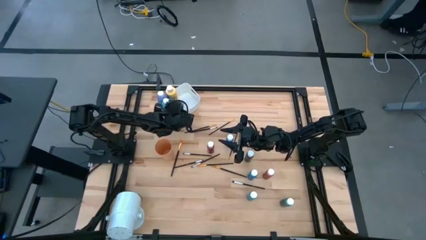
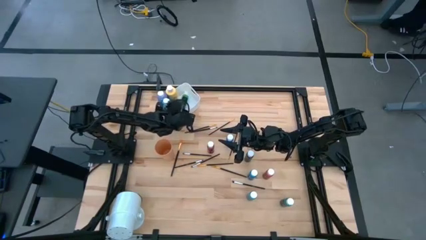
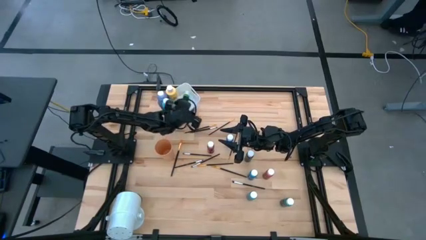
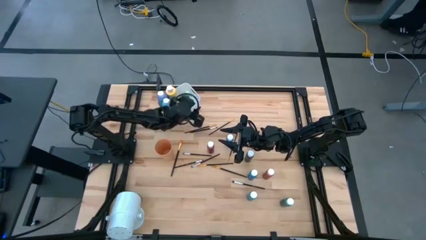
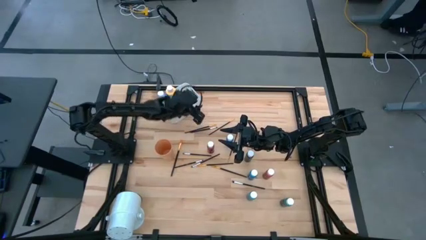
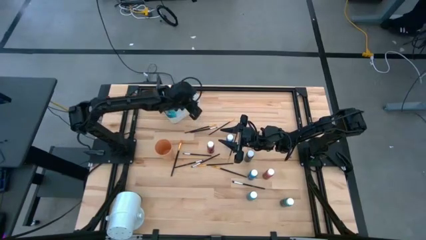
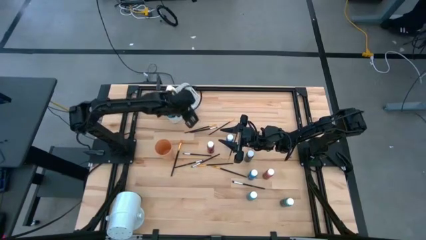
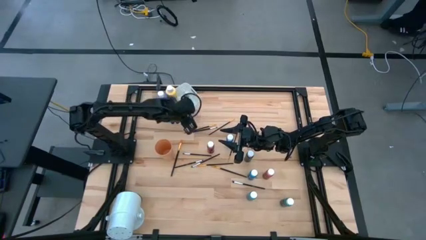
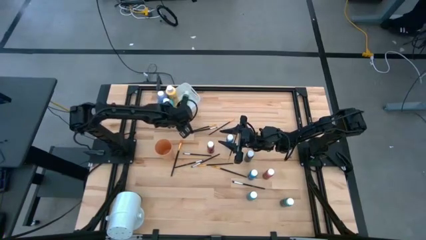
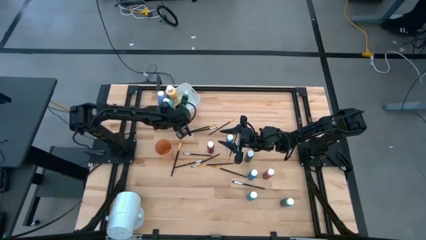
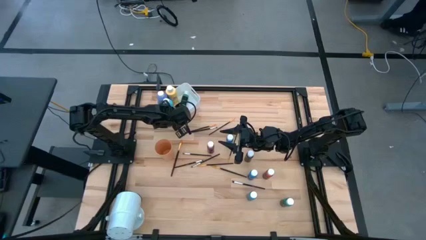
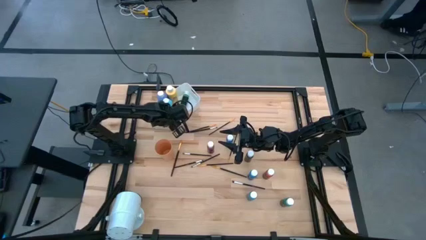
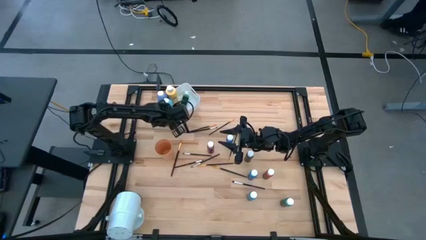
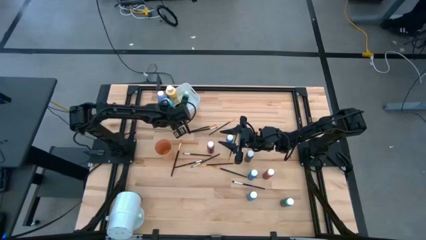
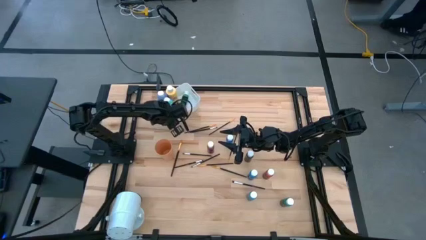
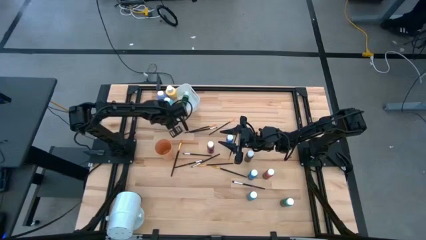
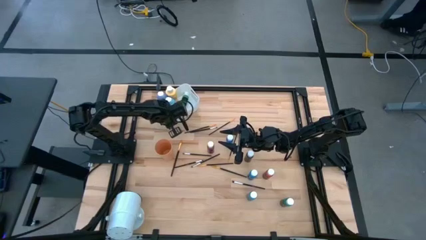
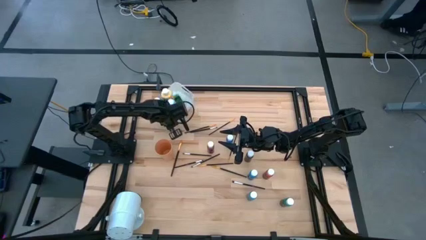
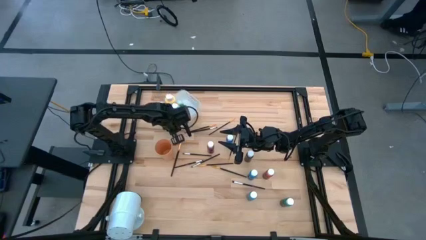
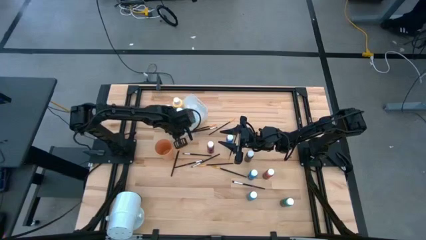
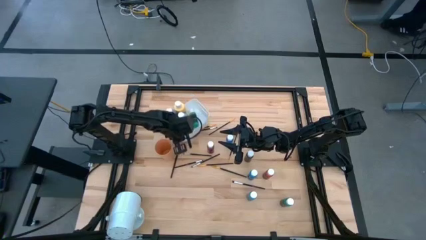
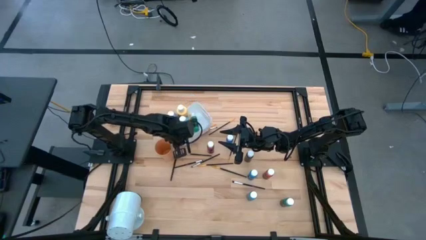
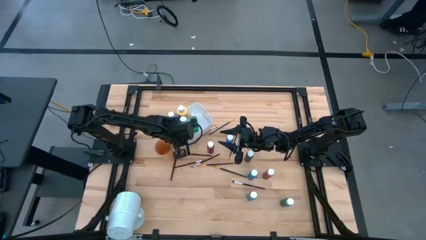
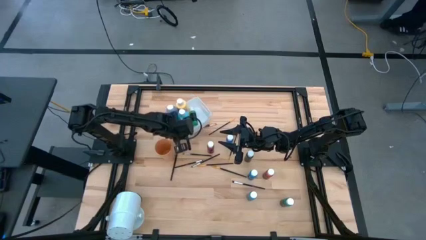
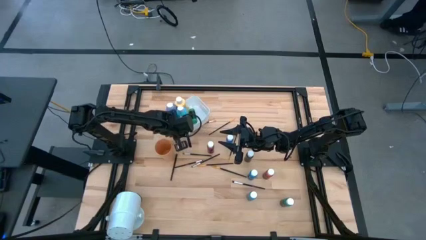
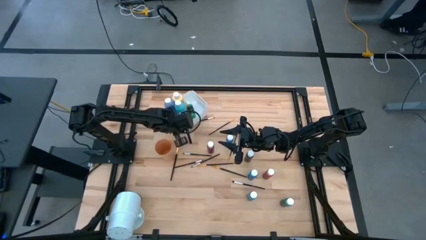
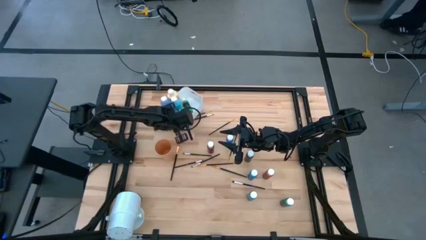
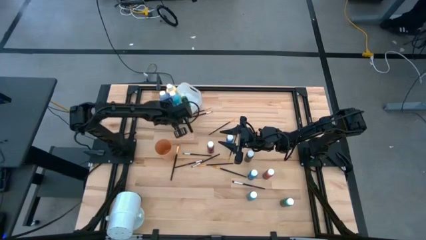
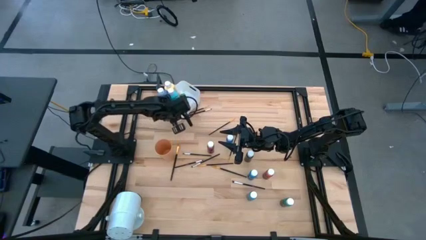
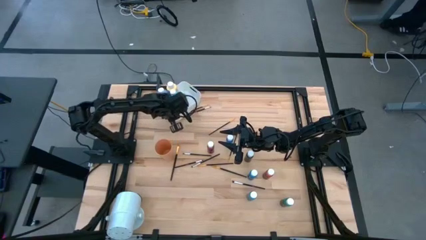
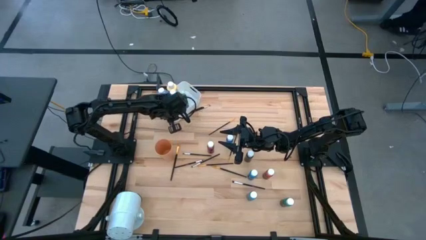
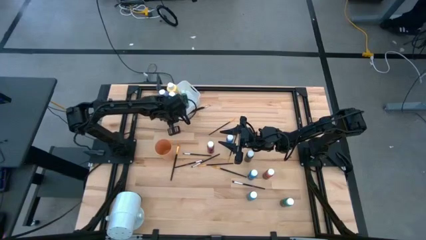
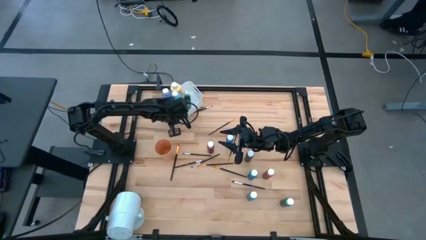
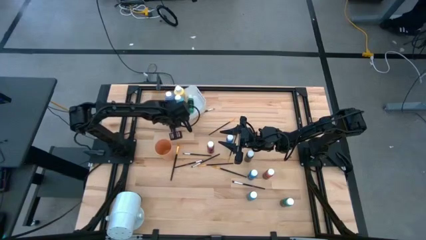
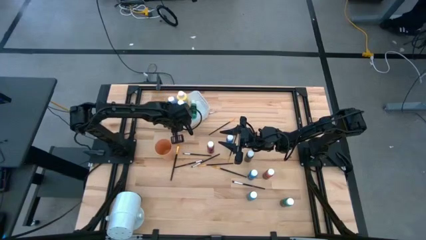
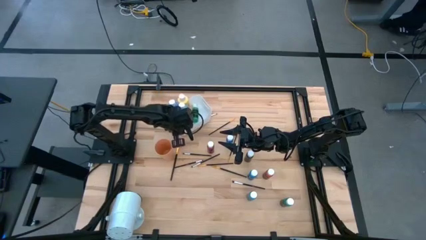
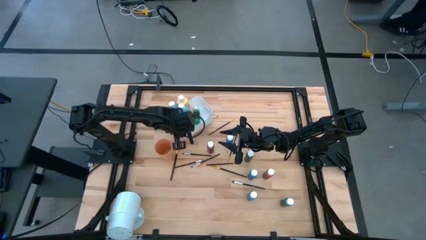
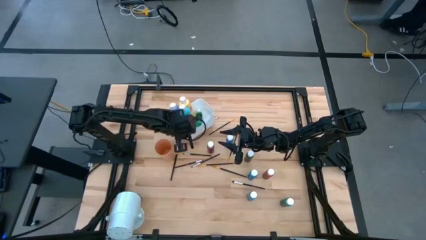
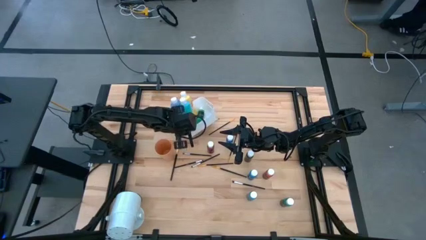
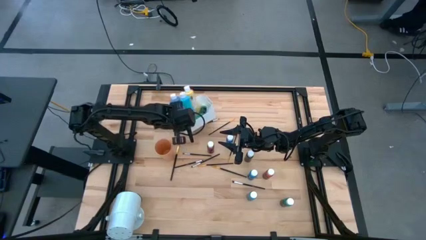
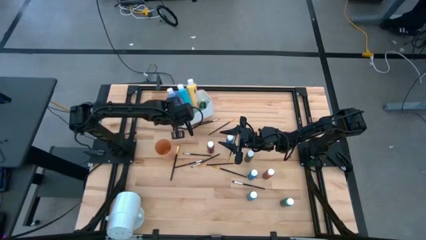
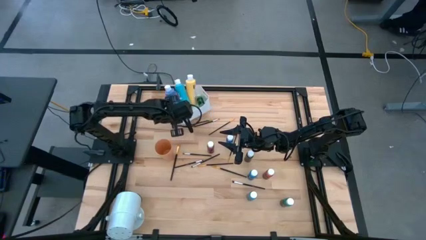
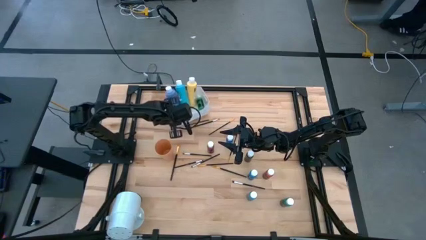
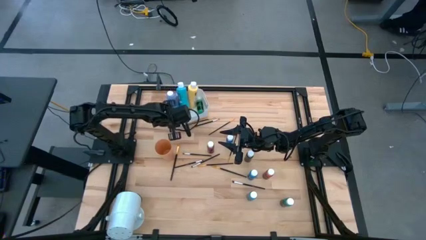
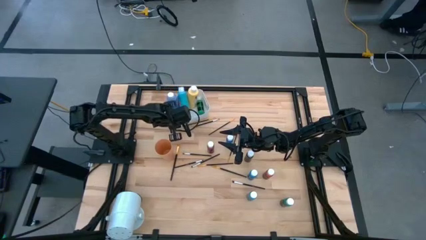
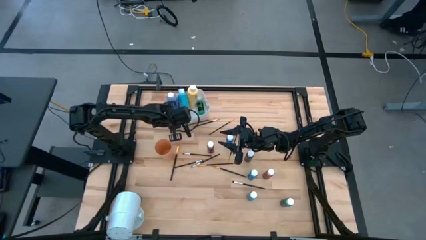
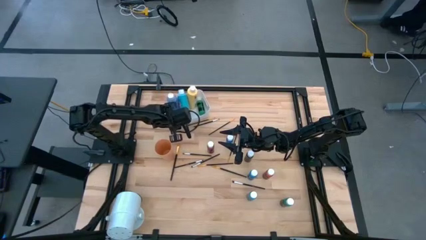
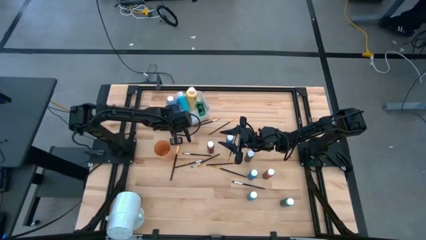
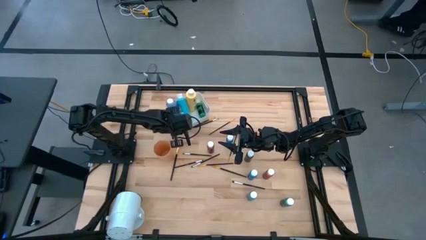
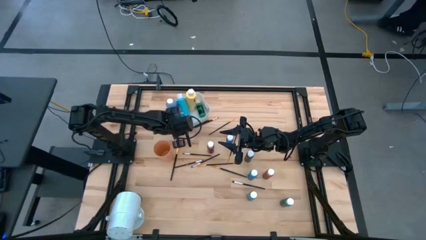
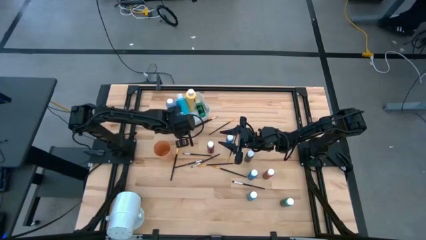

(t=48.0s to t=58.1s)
Task: Pick & Place Paint Supplies
Adjust the white bin

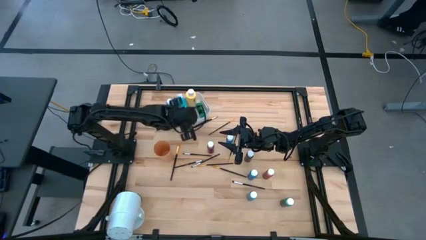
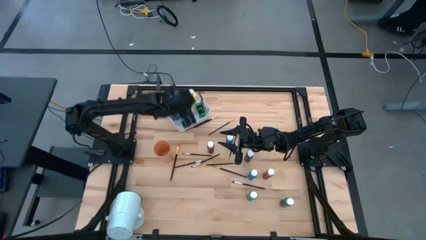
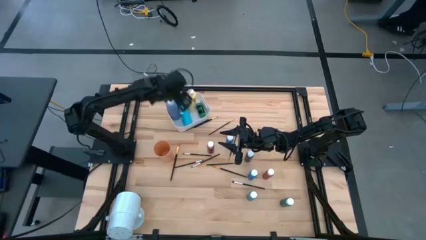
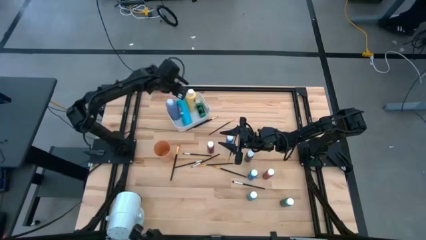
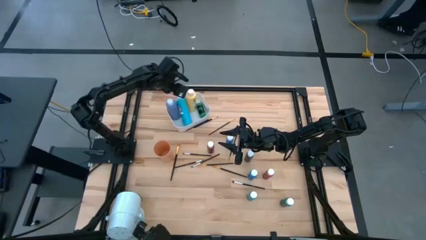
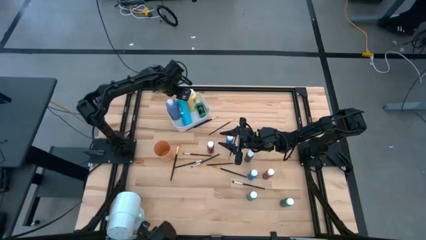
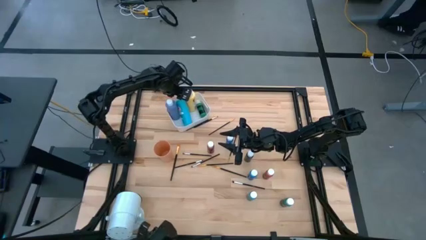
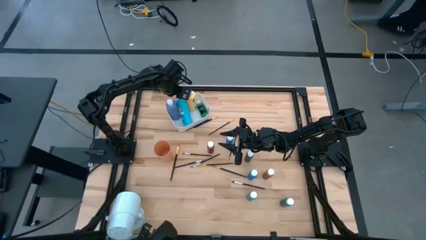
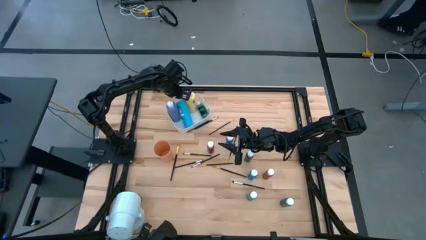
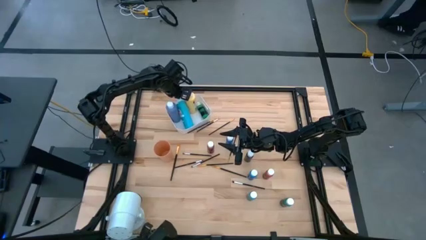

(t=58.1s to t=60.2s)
Adjust the large paint bottle in the white bin
